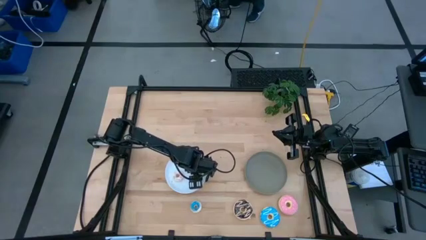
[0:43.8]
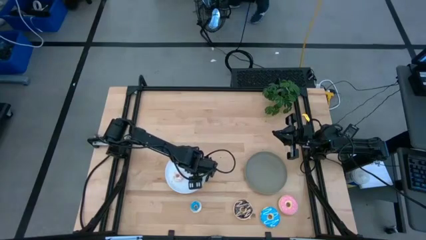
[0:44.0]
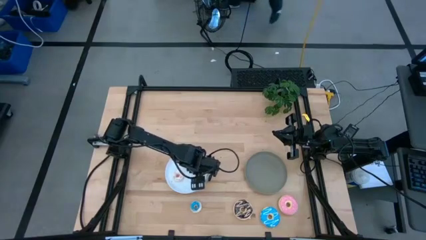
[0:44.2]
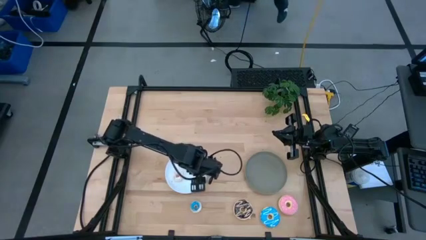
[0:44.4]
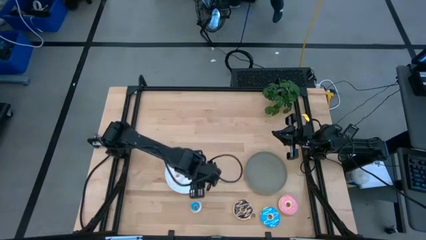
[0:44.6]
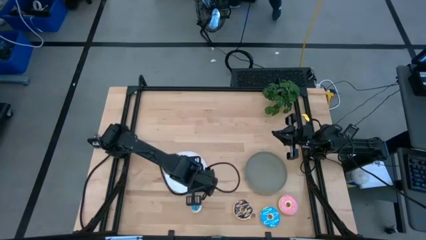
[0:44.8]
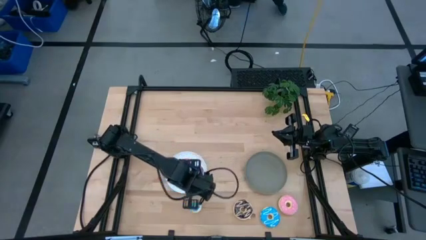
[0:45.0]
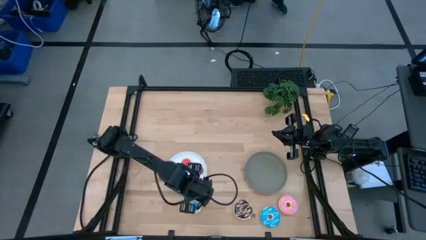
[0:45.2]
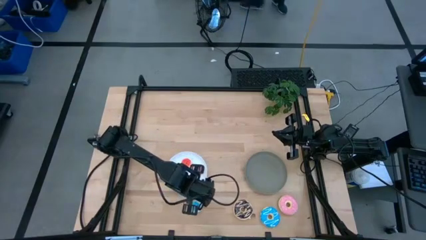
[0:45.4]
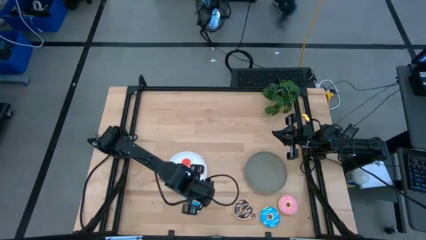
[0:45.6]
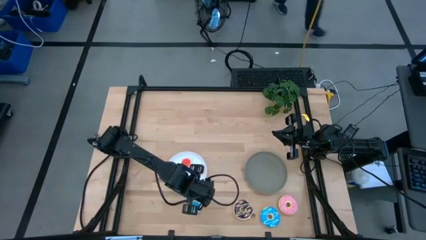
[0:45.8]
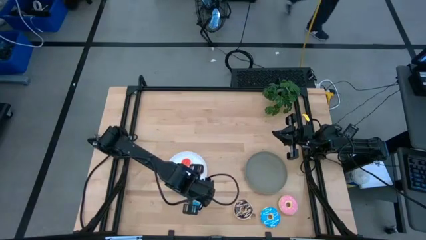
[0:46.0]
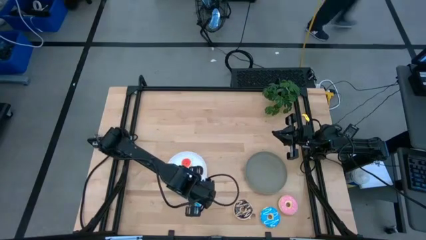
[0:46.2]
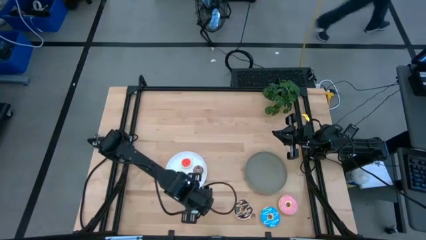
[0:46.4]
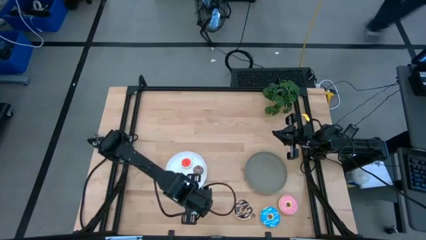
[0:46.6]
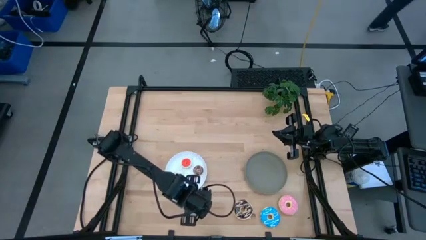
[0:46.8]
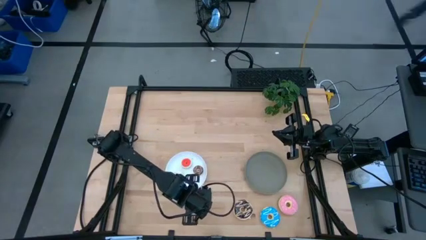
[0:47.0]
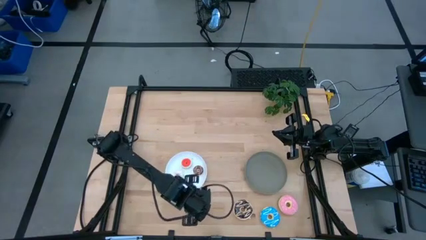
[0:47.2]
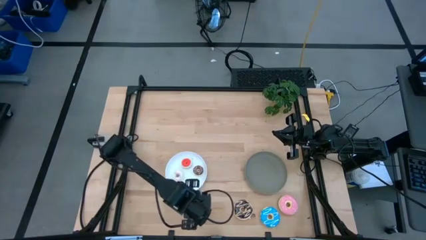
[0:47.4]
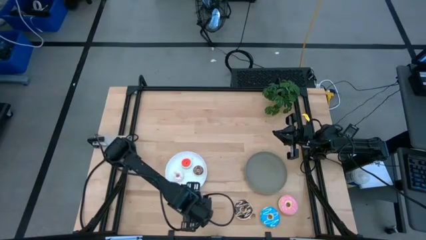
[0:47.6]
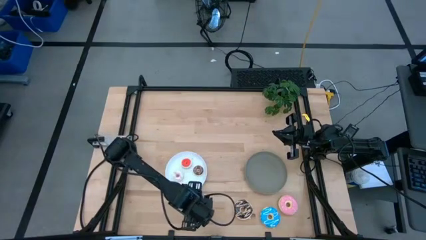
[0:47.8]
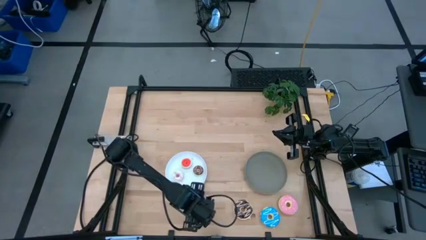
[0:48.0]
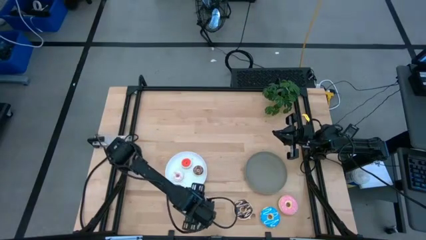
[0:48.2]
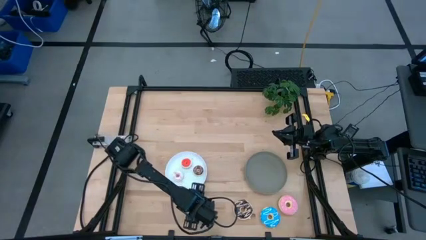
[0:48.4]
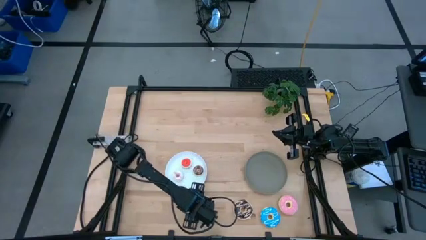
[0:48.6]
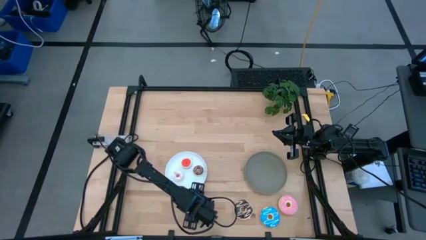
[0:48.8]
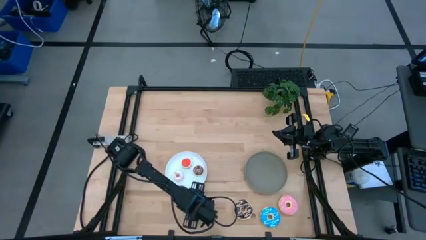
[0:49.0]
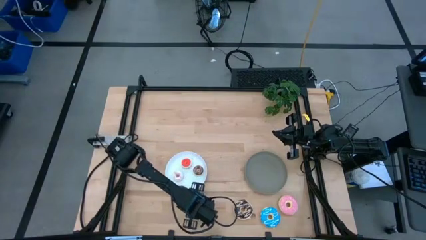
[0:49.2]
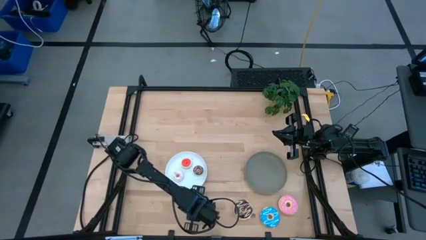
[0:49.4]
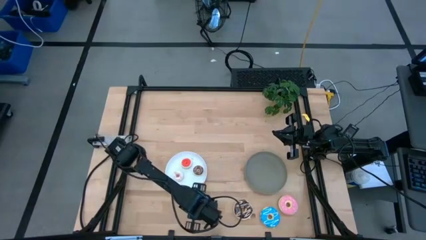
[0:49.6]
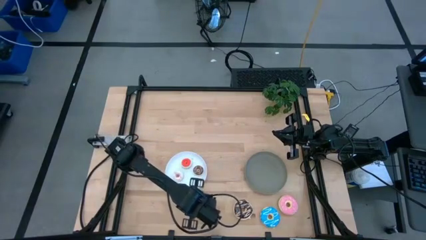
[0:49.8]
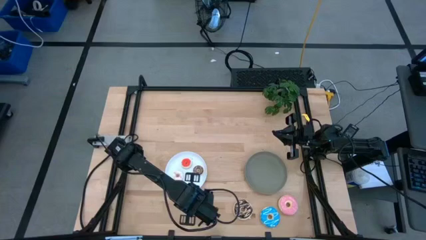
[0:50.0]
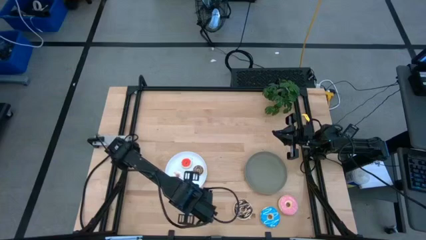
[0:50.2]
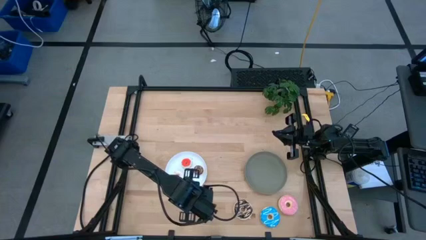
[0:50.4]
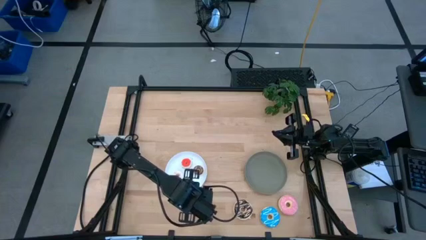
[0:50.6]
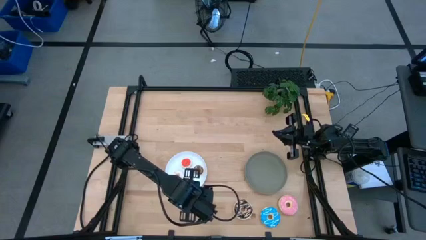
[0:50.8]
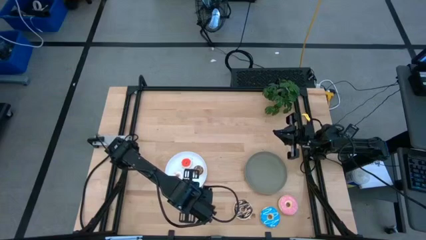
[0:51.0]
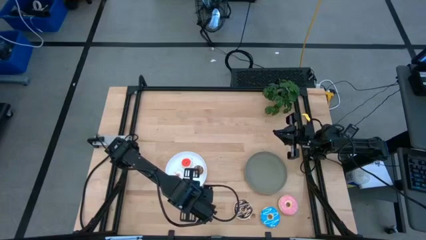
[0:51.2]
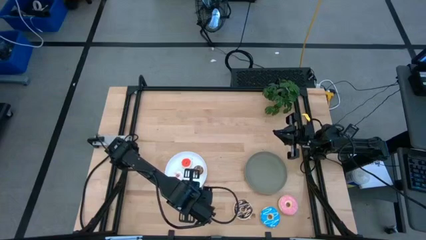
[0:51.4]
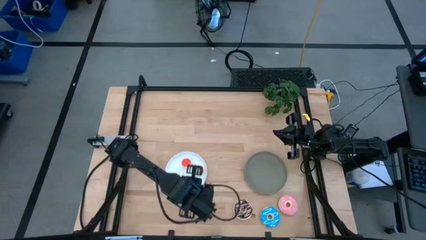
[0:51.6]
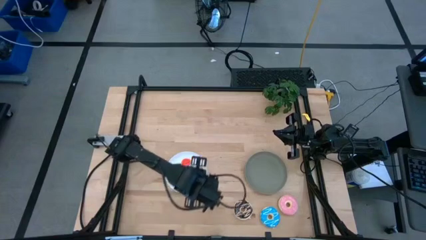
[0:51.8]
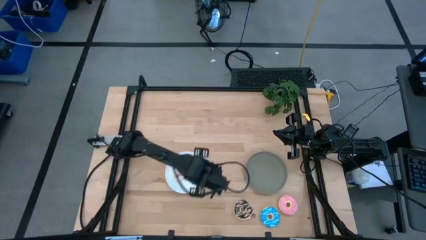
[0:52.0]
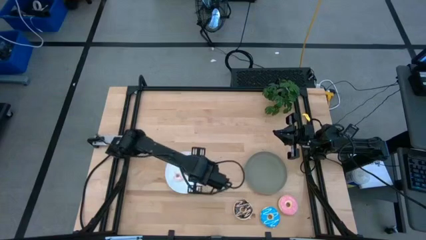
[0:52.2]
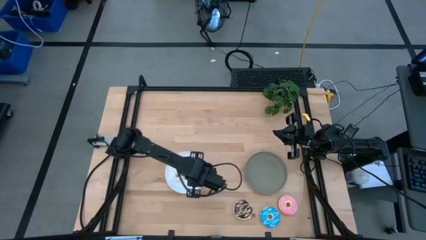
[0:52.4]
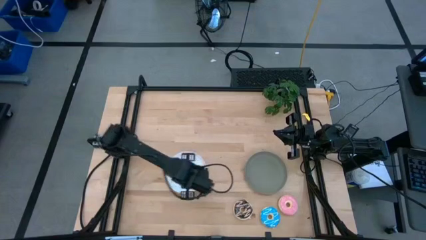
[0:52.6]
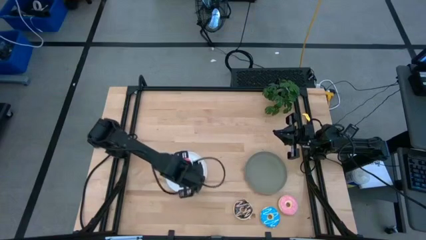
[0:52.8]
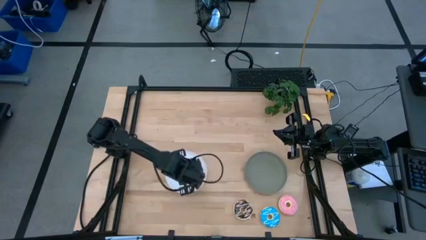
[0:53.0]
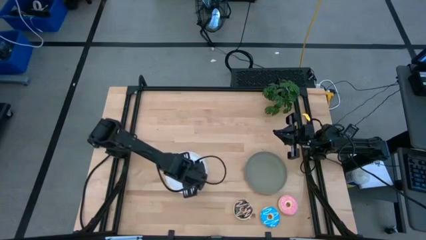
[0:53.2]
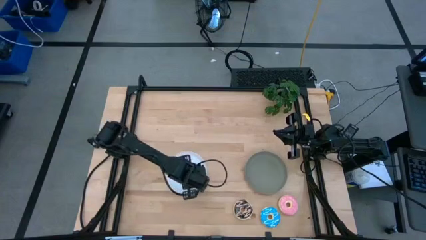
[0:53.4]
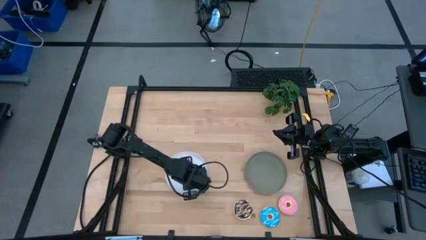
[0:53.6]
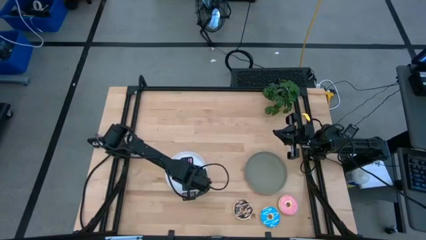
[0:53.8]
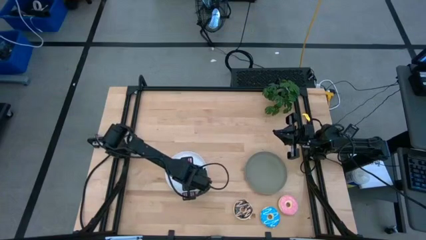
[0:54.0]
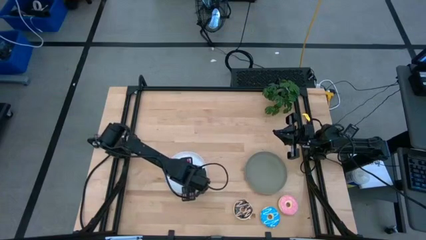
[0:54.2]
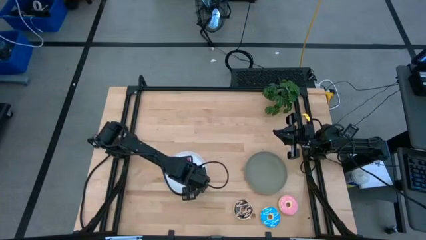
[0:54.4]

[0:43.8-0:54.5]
Task: Pick & Place donuts
Put the small blue donut on the white plate

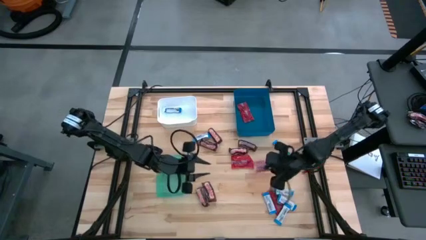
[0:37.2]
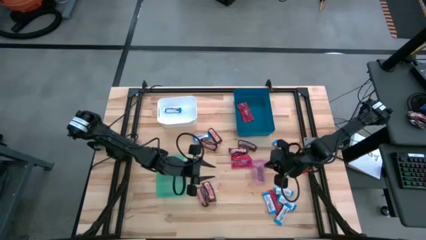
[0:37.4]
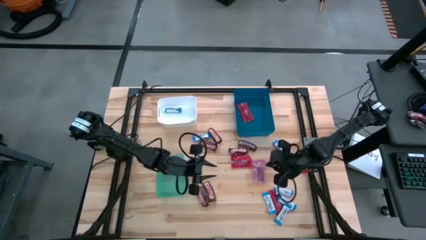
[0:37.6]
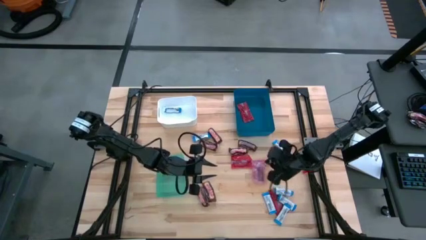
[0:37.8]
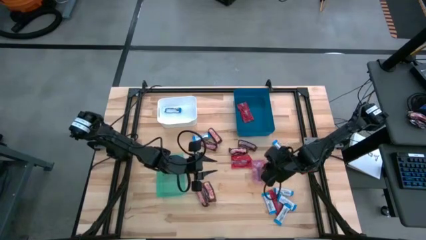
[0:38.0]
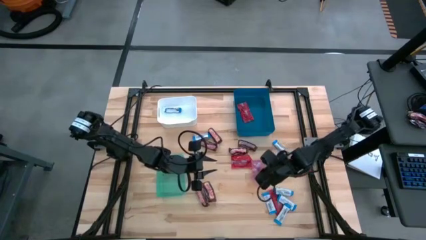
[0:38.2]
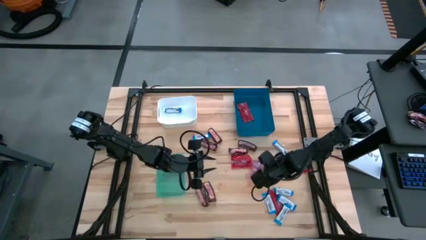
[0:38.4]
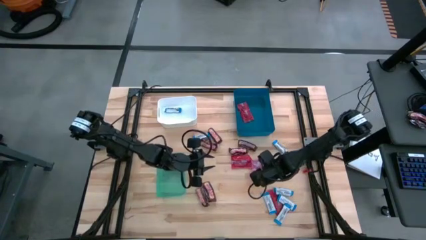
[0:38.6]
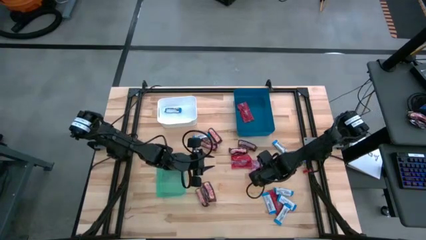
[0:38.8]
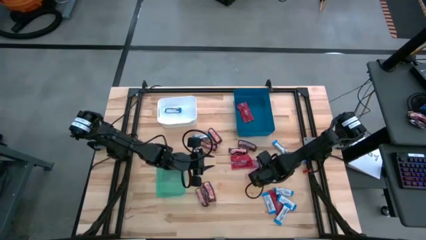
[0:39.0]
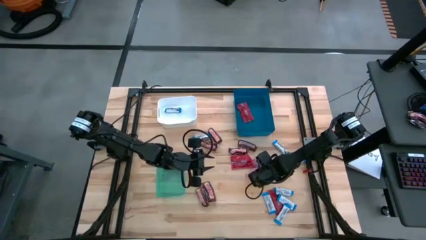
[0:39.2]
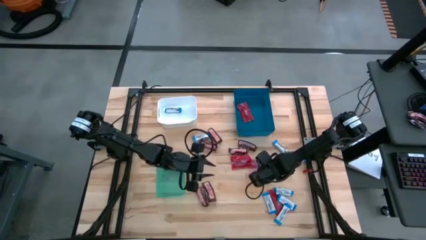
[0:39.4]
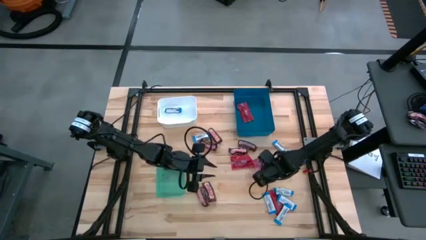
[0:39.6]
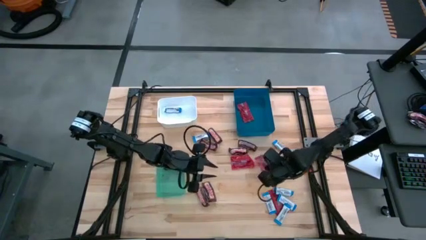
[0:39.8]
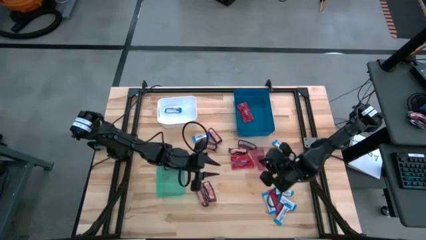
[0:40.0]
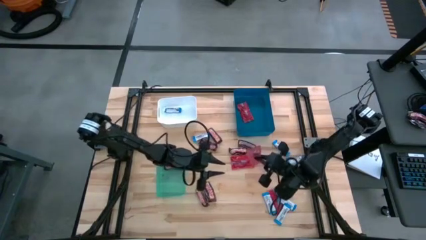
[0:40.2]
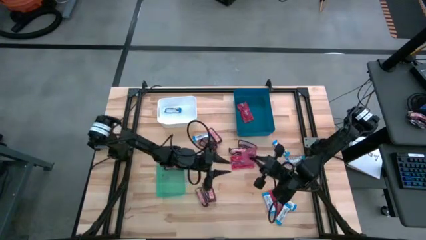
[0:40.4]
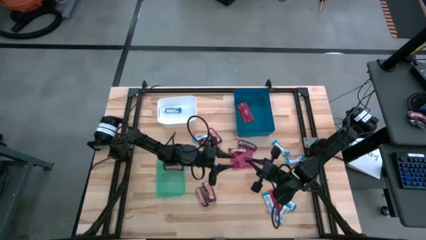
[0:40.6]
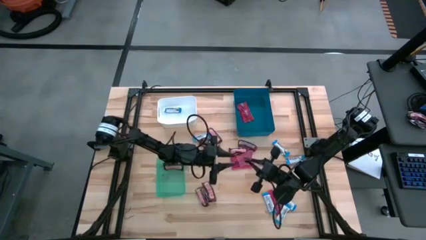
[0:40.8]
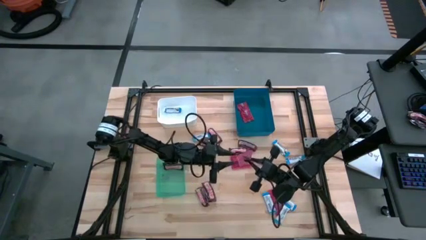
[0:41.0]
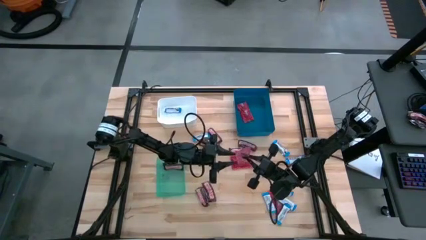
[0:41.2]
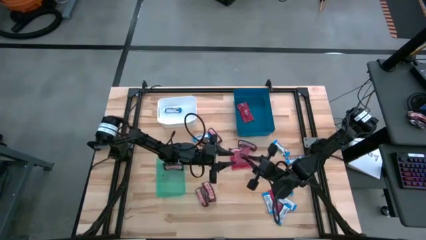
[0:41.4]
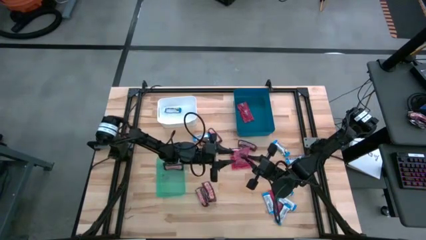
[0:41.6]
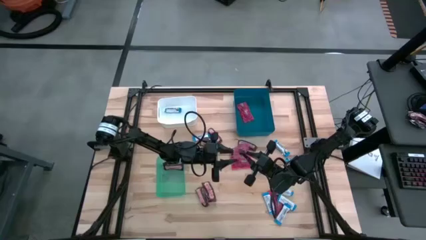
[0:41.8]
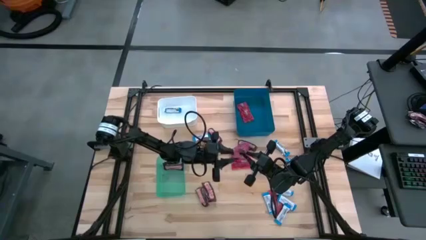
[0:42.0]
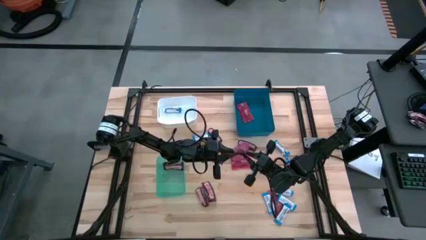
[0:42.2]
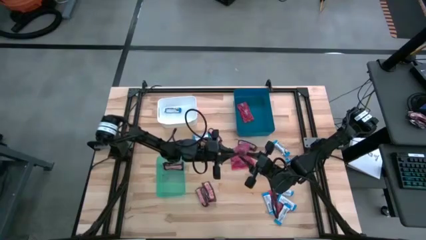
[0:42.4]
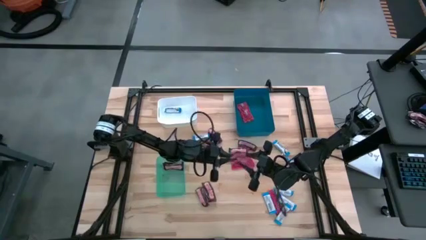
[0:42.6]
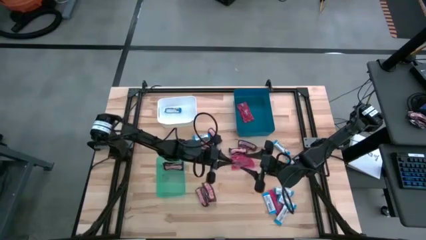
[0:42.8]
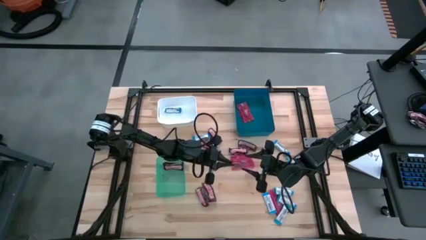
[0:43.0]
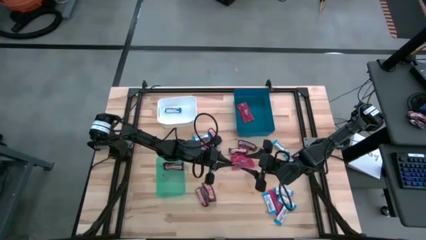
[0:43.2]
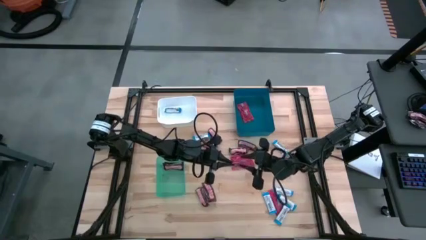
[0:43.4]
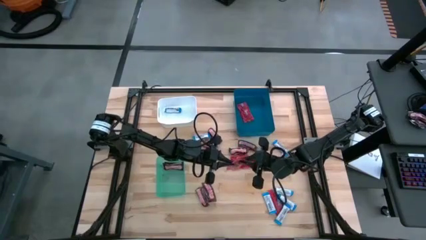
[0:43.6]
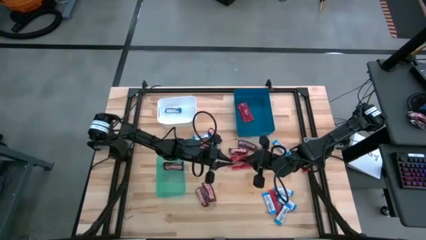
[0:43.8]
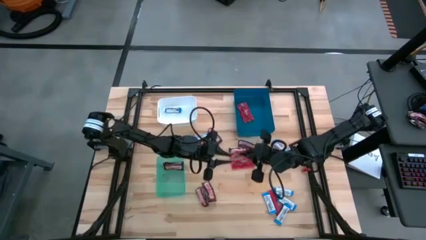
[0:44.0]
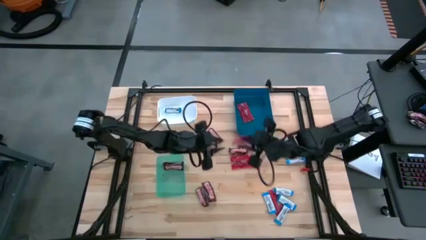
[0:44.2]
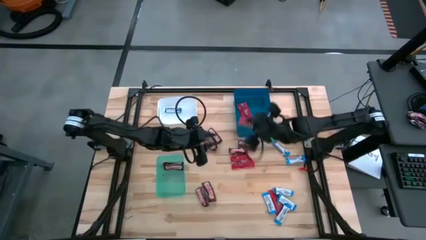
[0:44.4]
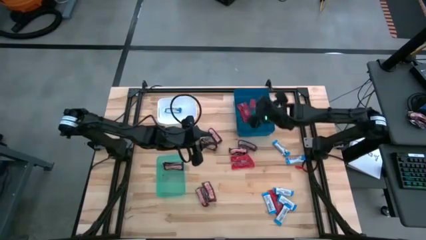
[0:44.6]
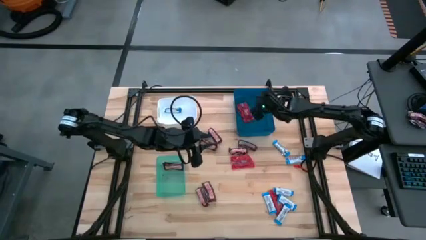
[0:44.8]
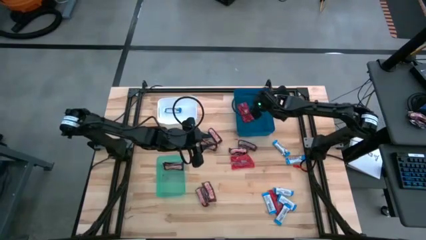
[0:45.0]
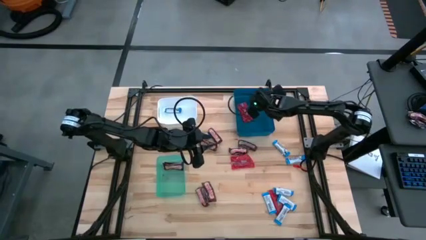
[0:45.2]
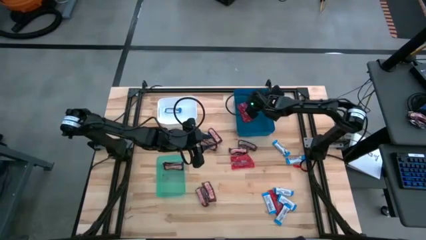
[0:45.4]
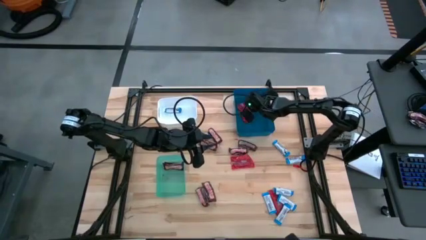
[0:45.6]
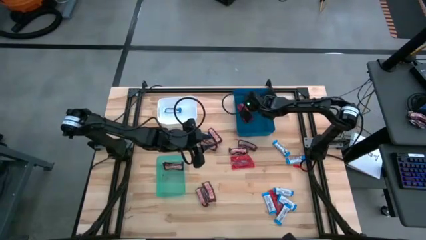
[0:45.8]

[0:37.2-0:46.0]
Task: Sort candy
Put the red candy into the blue bin
